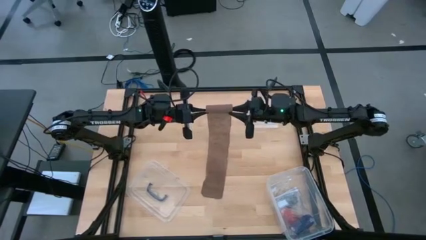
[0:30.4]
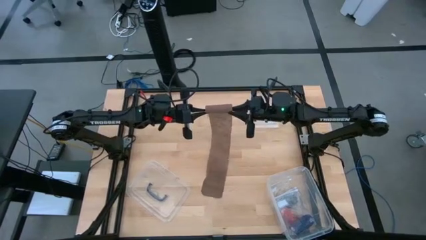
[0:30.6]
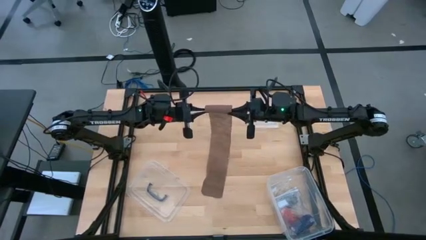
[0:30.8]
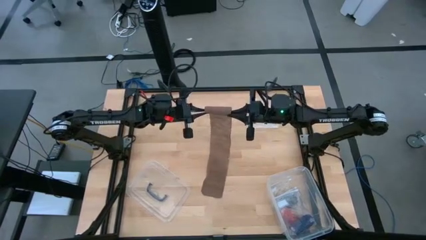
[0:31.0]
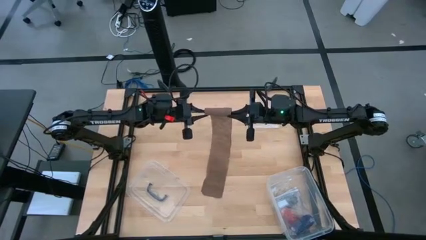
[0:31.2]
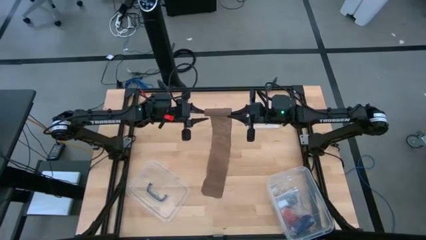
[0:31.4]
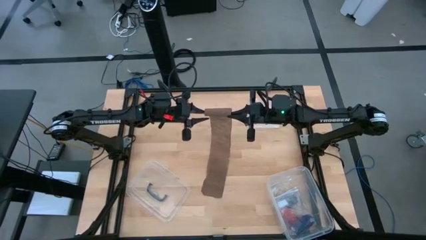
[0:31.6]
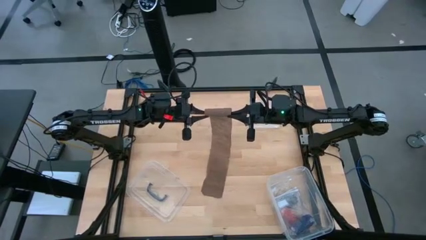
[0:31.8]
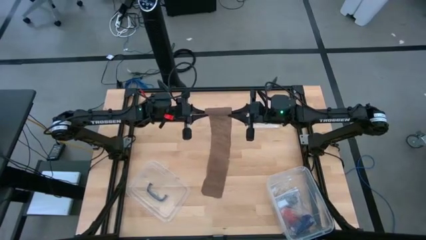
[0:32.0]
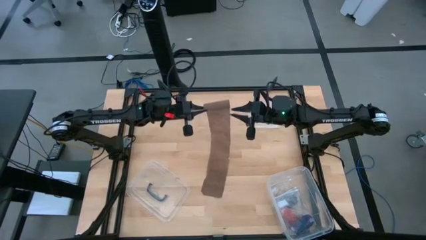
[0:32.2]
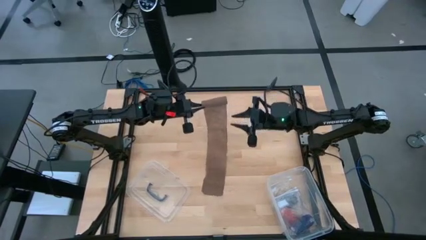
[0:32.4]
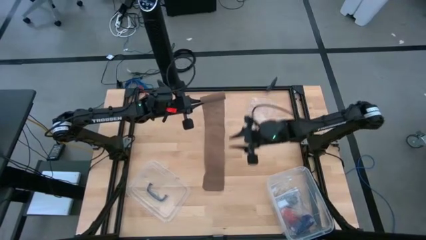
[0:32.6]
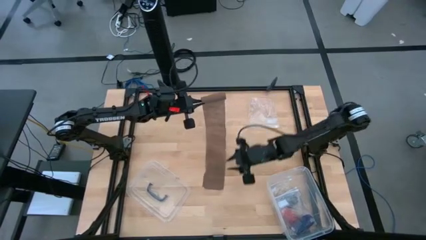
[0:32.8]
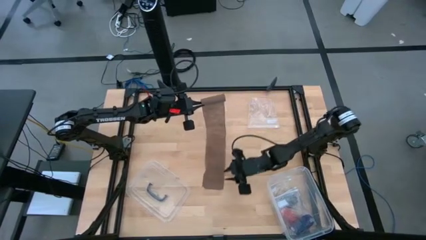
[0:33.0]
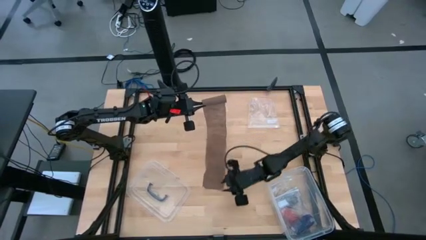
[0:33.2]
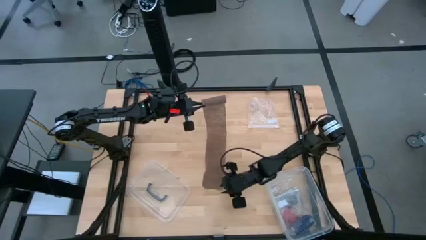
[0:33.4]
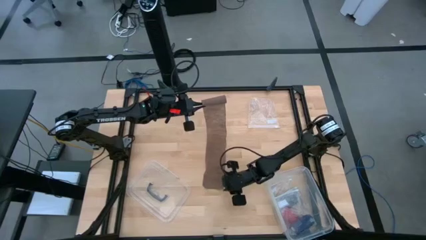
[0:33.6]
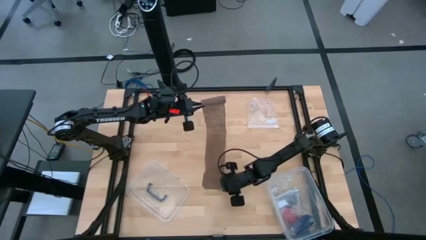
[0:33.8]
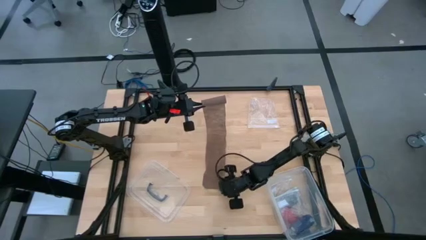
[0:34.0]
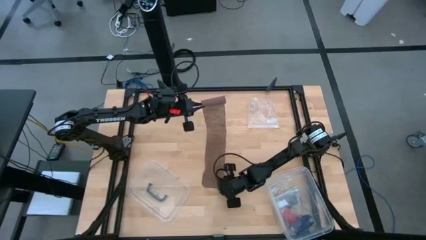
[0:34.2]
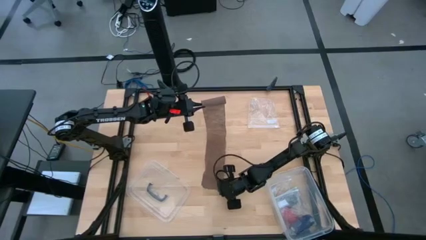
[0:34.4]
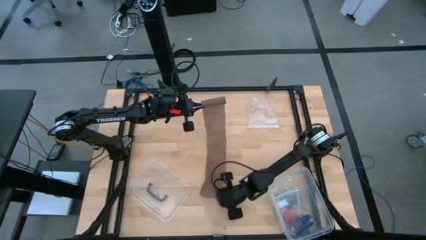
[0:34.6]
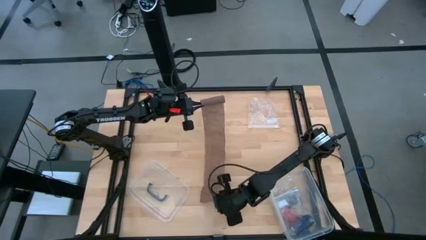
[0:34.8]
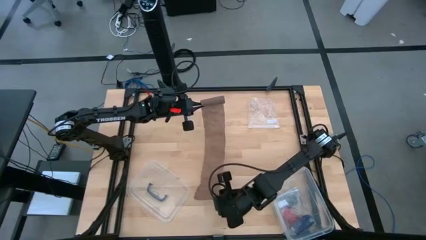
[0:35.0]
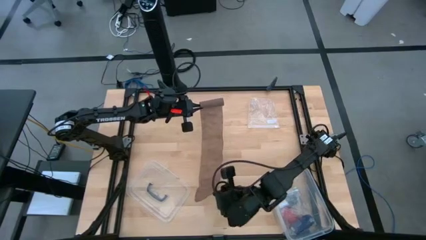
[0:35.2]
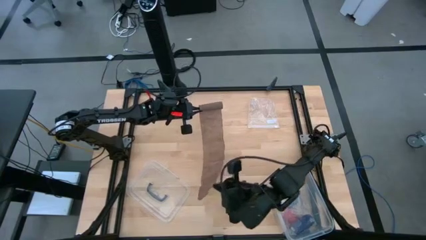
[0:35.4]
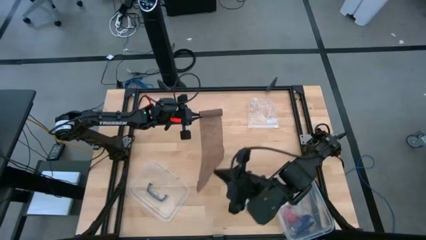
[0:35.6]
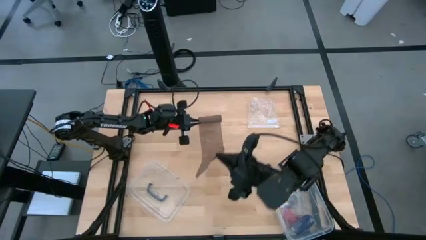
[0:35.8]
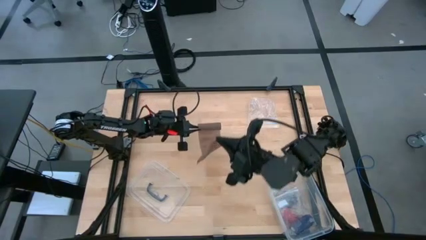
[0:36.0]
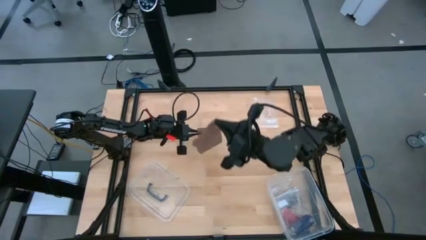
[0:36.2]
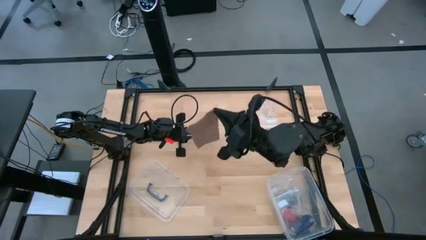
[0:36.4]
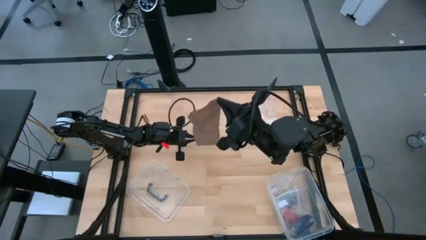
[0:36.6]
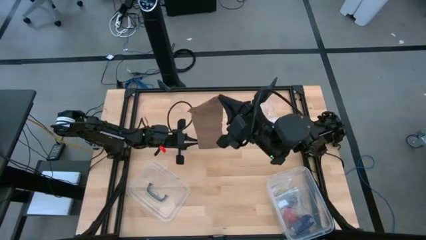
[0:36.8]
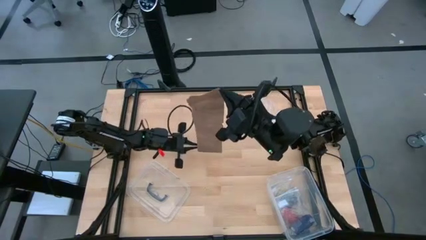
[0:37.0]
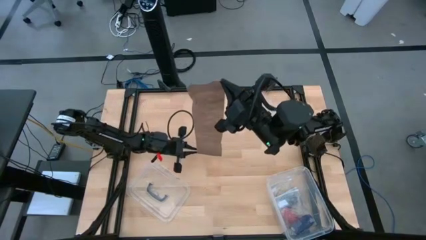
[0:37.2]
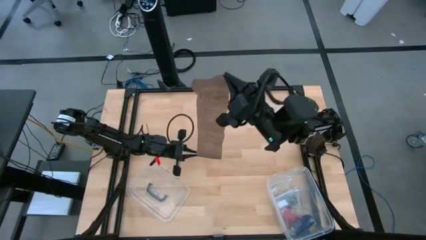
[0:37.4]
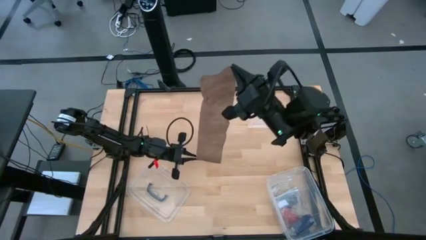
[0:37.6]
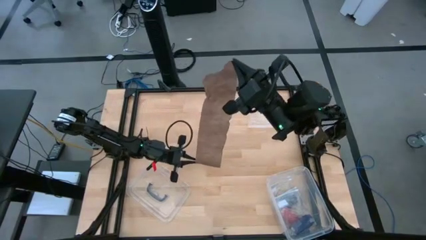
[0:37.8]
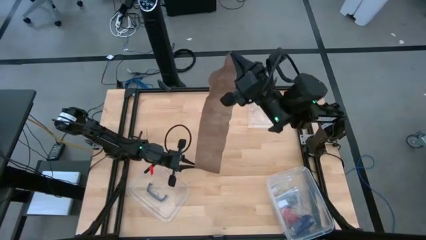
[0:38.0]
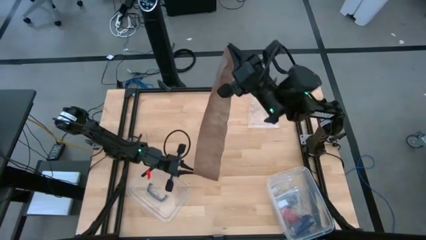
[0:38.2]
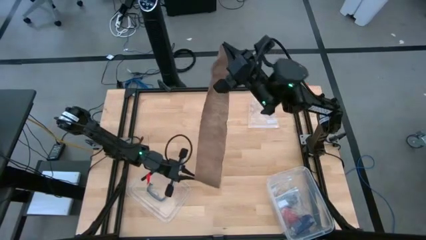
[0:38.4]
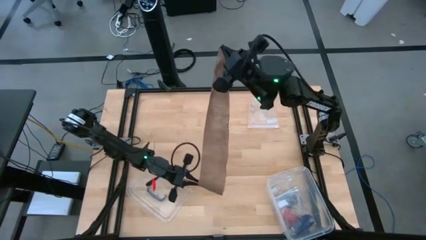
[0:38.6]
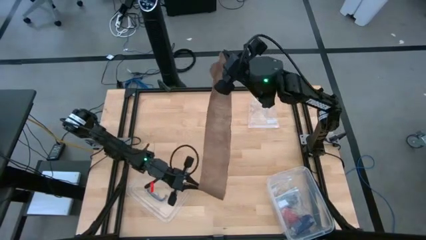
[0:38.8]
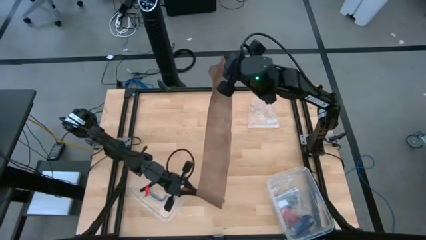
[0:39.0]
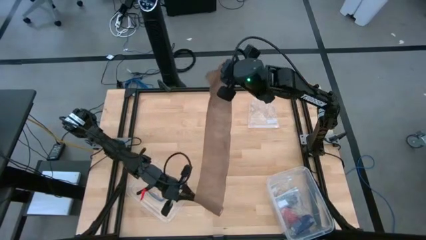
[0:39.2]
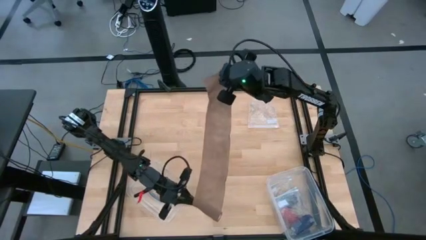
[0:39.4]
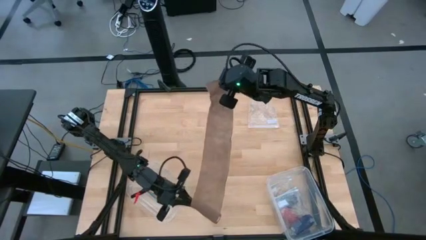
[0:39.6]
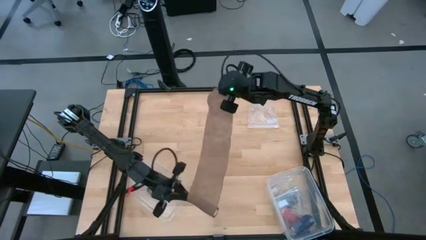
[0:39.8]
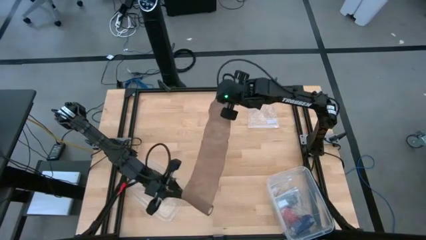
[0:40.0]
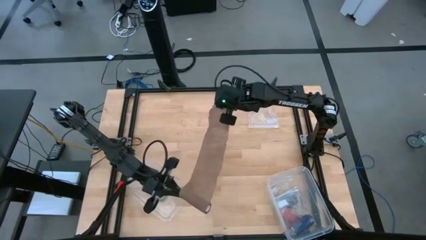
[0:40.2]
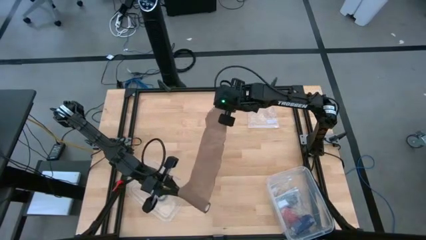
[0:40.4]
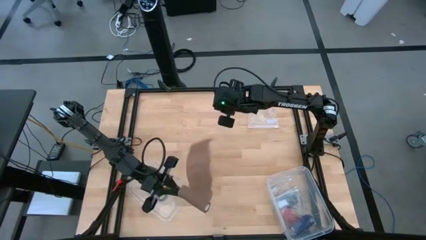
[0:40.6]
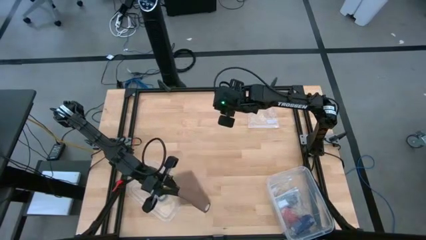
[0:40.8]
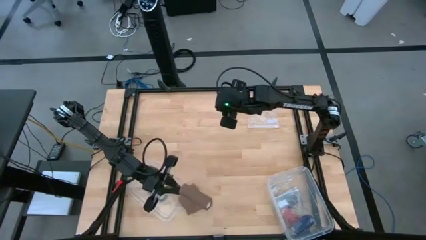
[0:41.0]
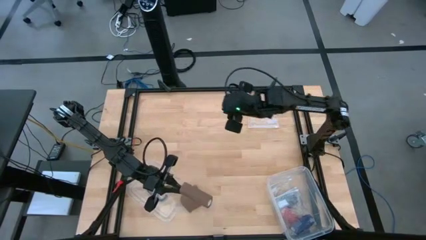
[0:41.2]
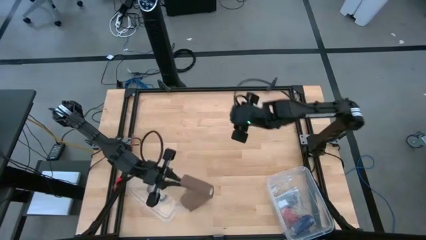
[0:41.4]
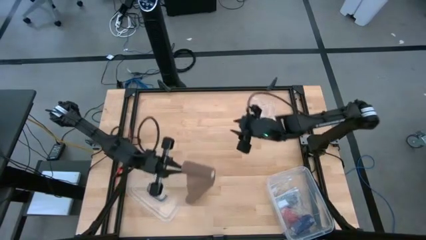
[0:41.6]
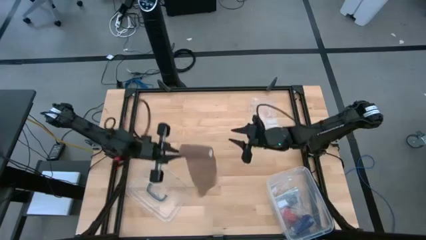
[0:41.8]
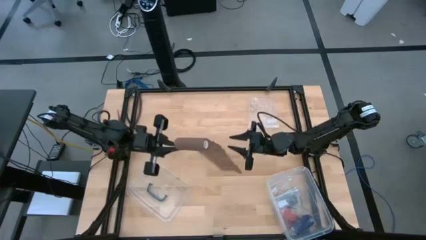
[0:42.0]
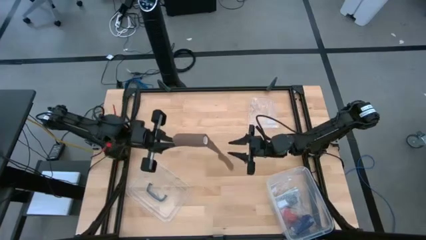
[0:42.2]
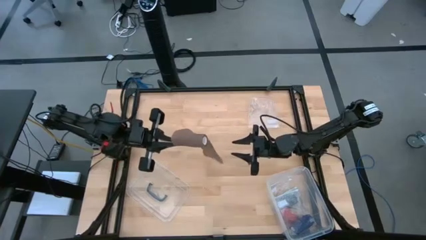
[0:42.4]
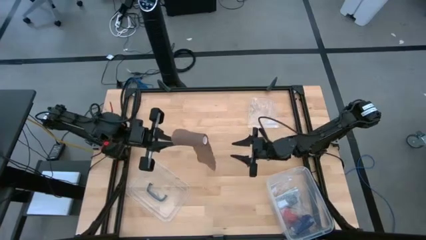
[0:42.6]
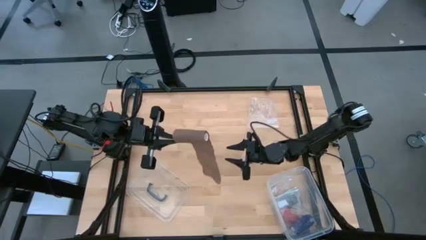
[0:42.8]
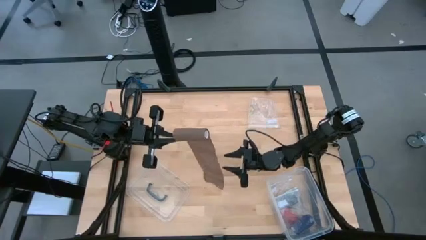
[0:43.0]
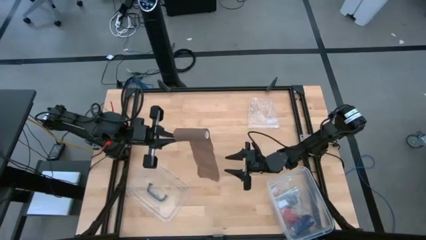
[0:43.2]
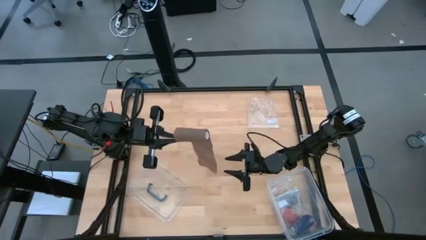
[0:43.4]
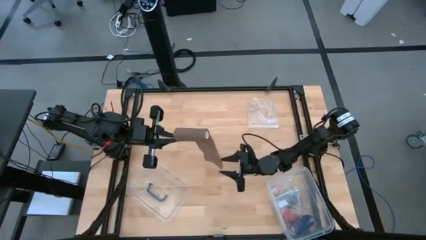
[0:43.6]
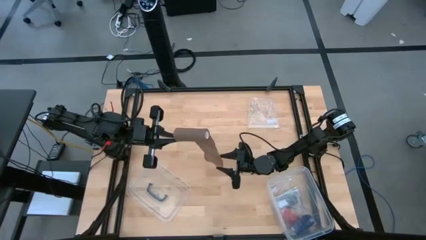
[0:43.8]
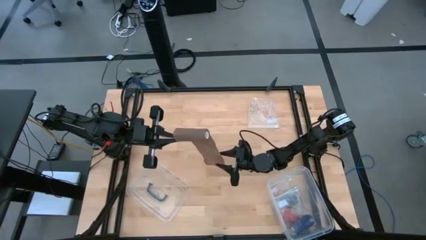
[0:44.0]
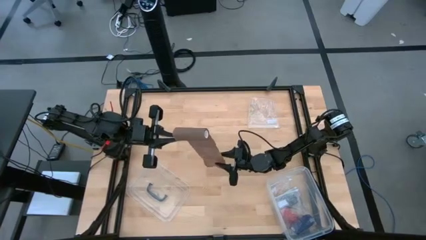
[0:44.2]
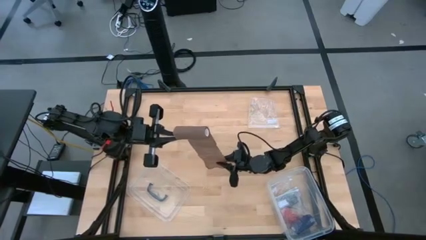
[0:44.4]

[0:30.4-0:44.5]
Task: Roll bandage
Roll the brown bandage

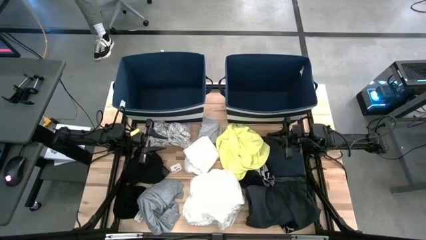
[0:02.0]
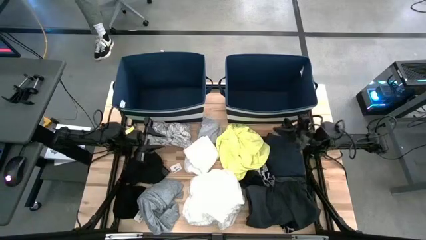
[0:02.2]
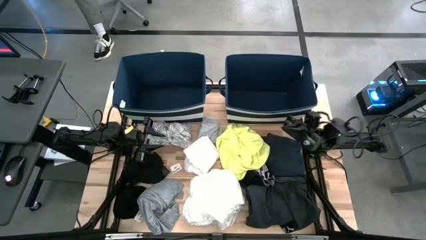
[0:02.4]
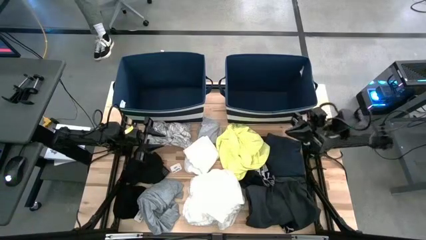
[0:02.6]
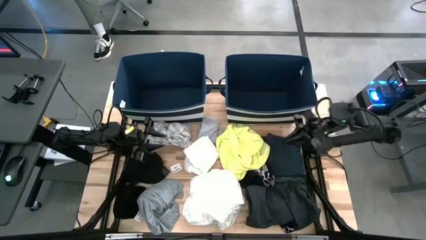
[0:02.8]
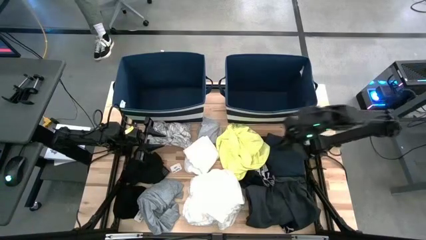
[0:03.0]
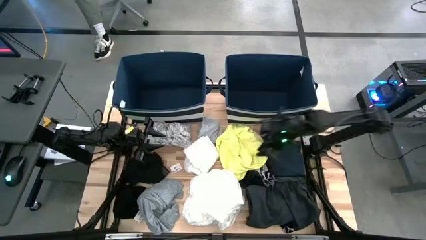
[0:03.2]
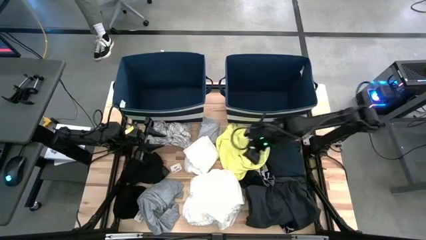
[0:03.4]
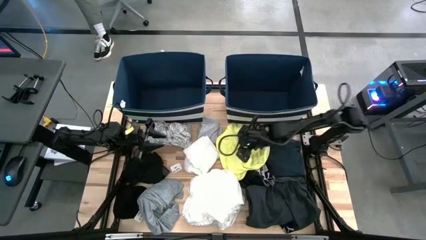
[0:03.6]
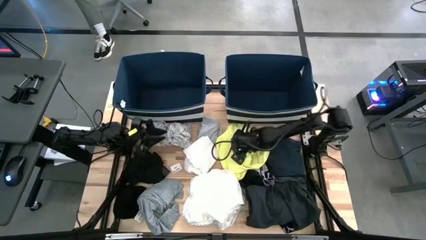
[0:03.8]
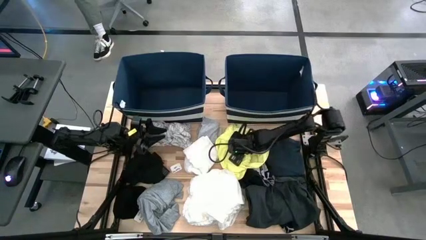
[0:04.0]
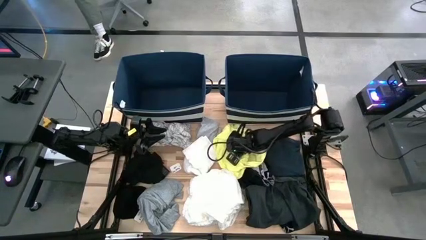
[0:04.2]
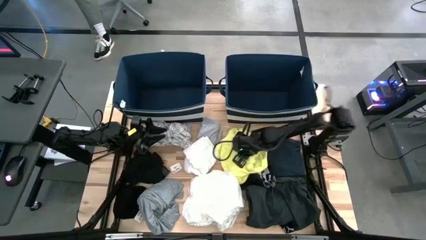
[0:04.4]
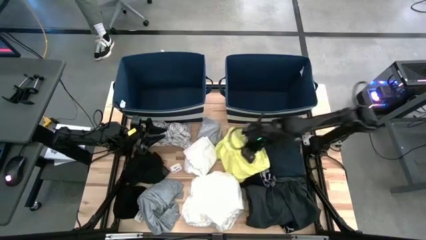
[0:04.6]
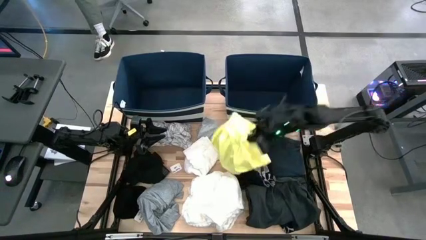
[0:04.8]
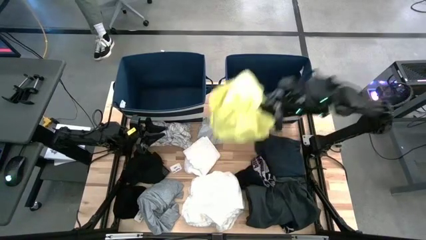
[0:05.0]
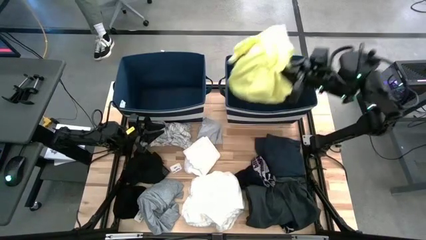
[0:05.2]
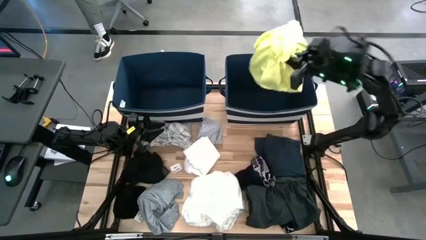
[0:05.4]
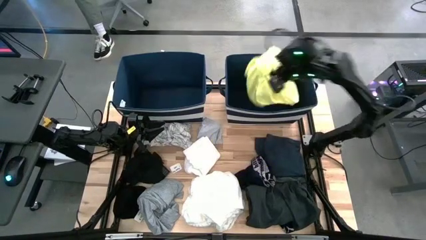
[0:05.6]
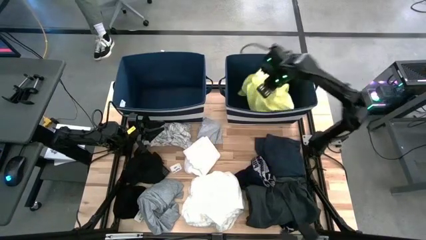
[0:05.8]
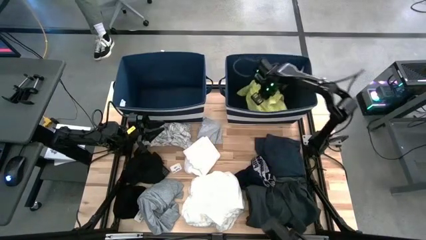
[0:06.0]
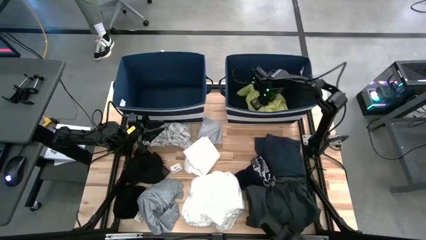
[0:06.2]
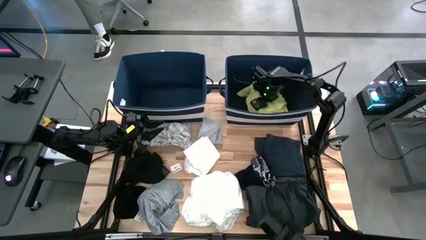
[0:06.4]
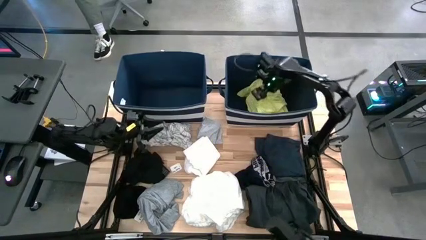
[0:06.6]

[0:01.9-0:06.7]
Task: Sort clothes
Put the yellow shirt into the right blue laundry bin
